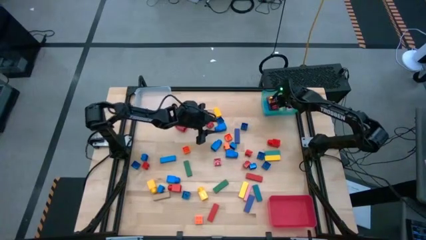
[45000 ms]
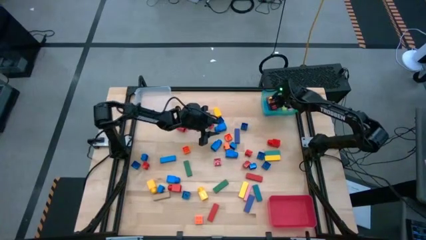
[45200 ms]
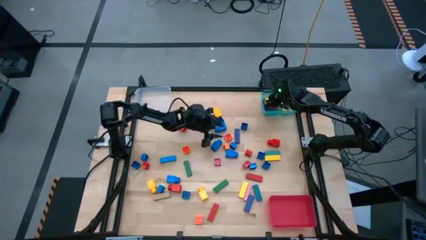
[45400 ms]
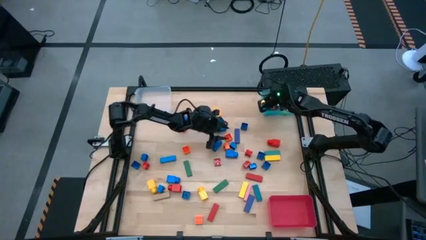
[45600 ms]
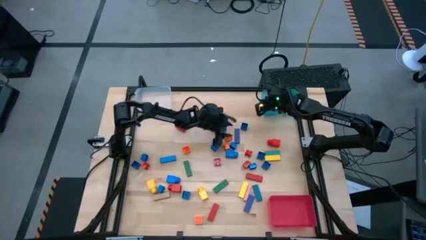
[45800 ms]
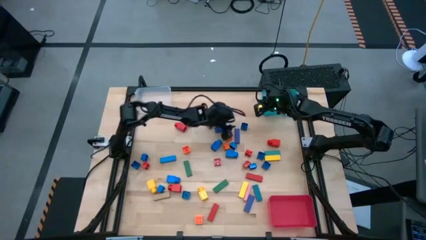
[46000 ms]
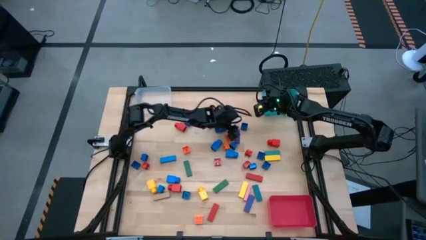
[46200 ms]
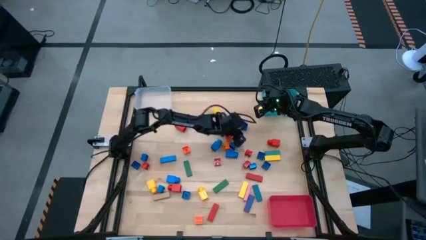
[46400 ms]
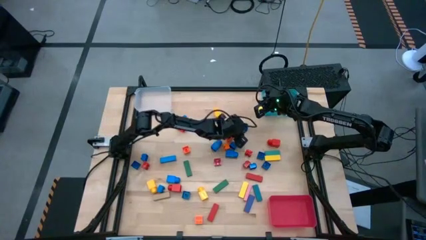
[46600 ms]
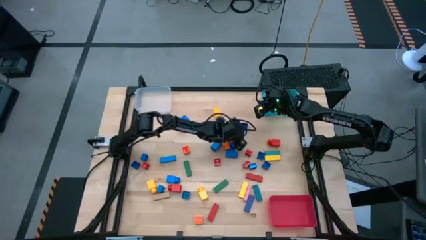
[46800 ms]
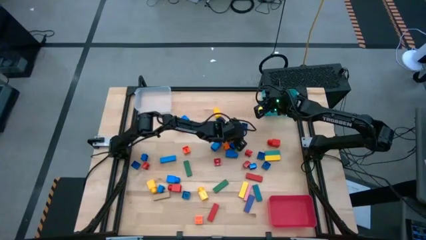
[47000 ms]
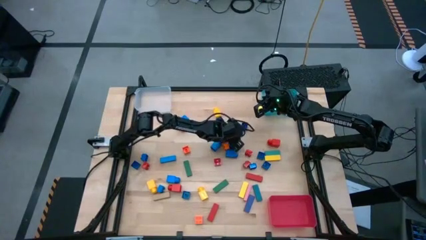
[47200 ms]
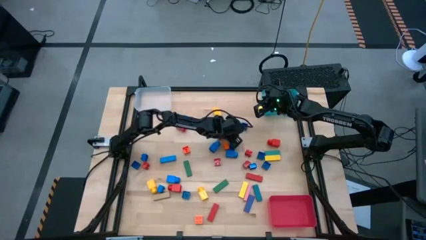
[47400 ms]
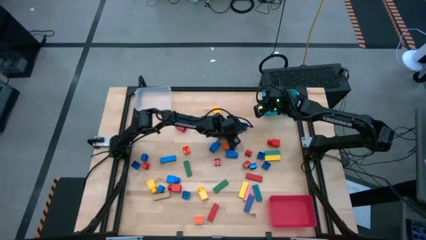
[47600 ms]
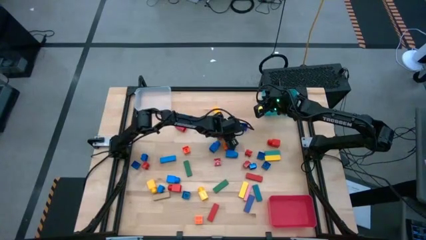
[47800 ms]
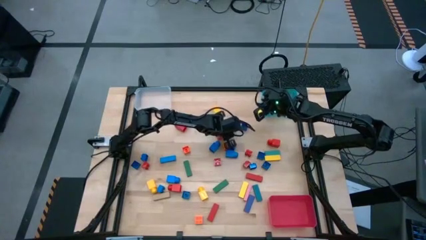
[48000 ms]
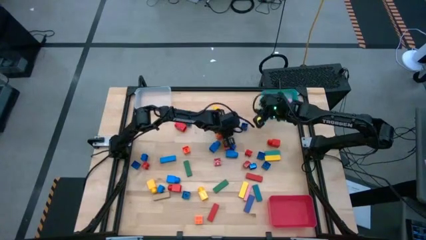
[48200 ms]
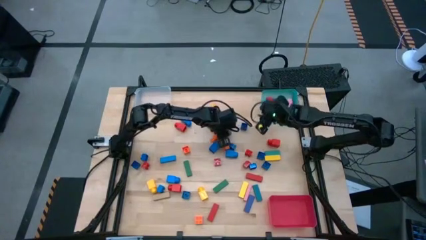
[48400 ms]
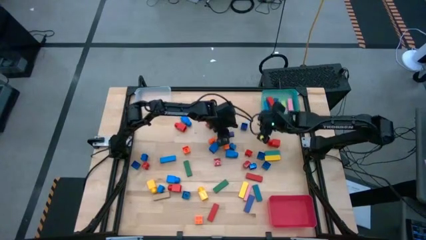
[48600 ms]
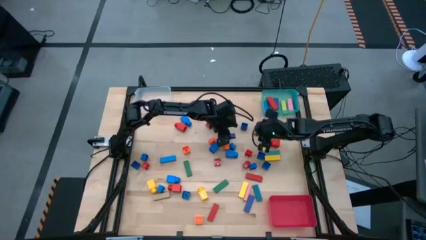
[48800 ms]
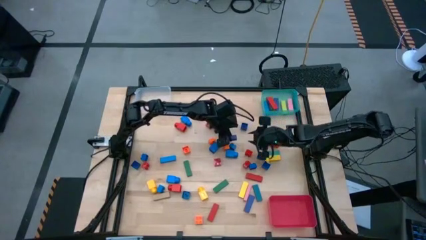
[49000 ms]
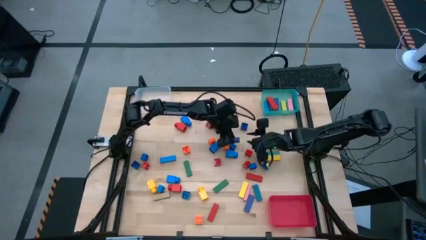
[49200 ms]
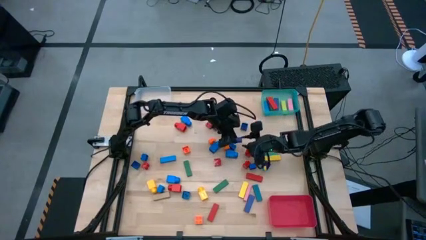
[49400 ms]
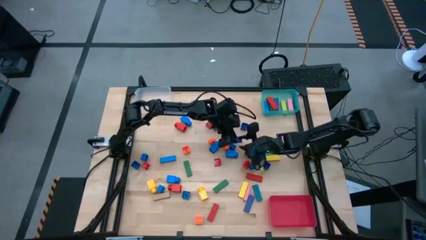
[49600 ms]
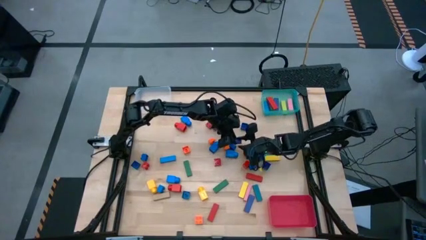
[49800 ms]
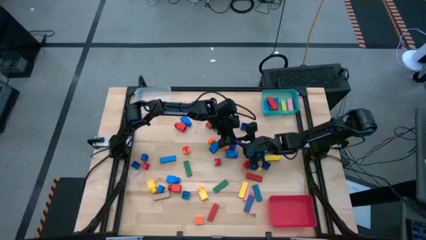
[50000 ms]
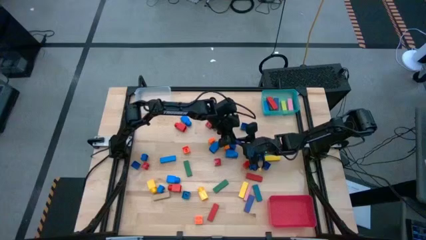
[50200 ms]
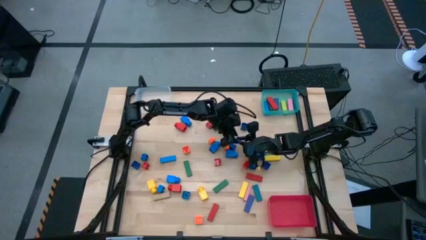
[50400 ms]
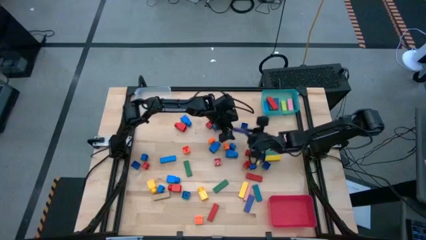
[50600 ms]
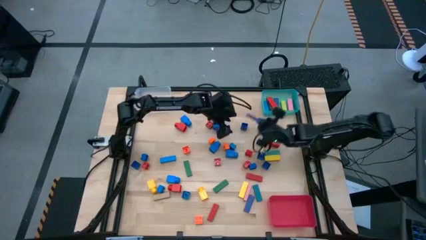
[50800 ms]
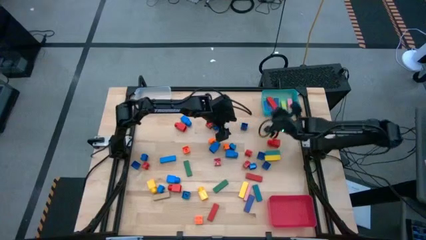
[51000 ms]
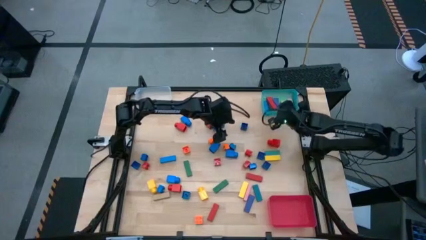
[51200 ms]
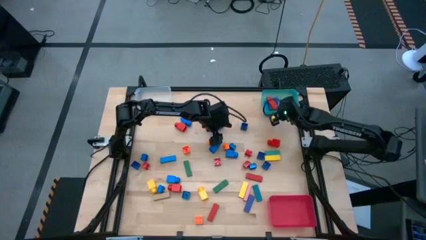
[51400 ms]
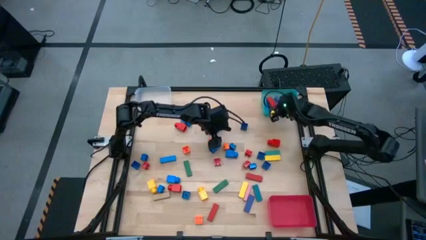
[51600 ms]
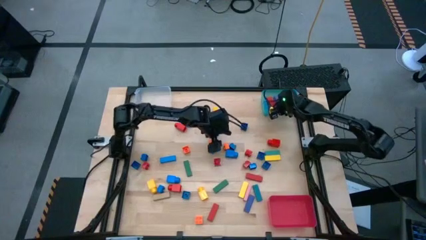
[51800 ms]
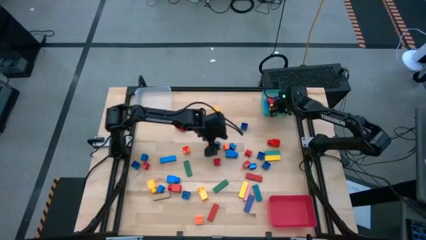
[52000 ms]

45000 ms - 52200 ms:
Task: Sort blocks by size
Put the blue block into the blue bin

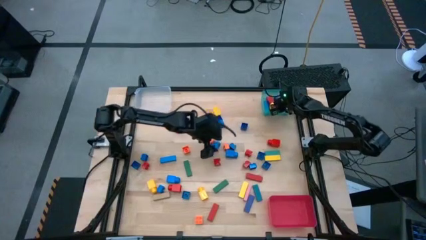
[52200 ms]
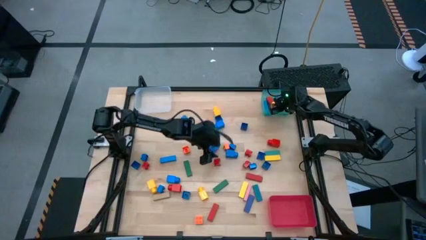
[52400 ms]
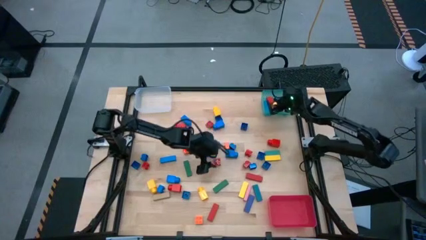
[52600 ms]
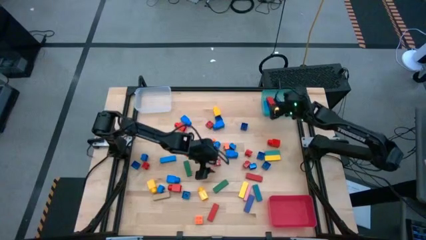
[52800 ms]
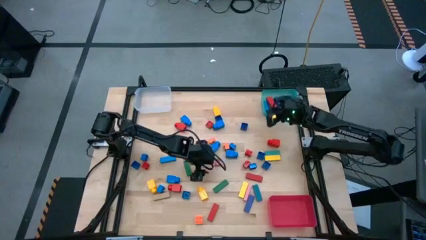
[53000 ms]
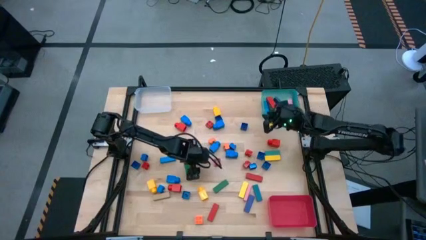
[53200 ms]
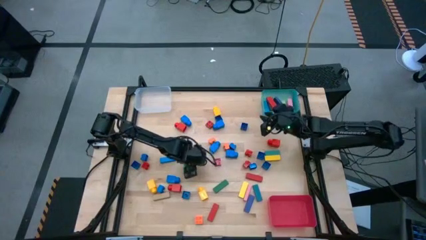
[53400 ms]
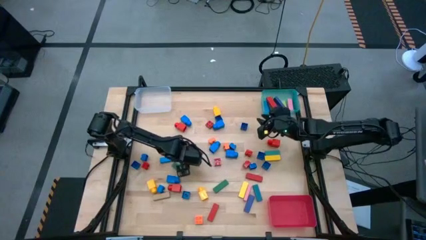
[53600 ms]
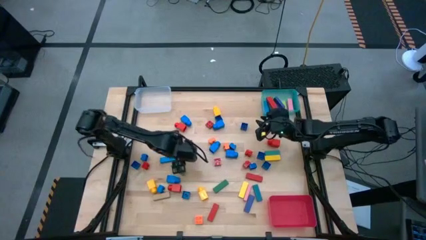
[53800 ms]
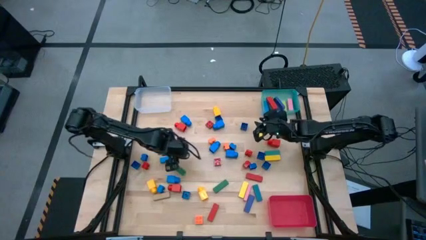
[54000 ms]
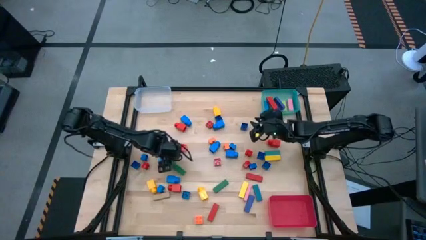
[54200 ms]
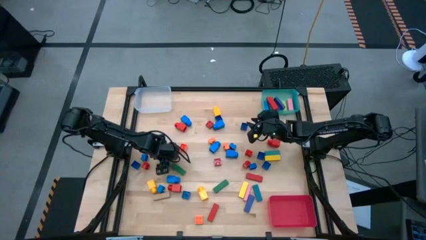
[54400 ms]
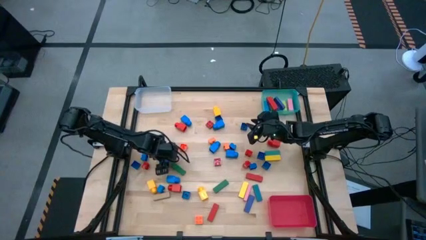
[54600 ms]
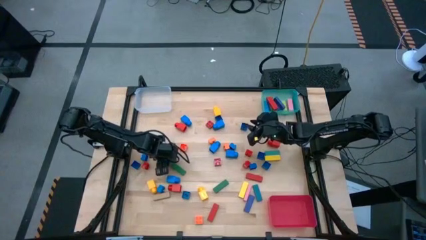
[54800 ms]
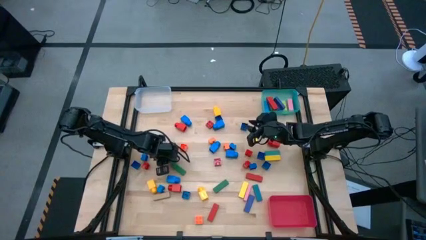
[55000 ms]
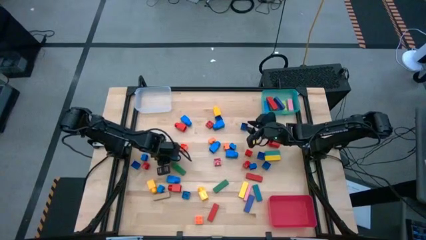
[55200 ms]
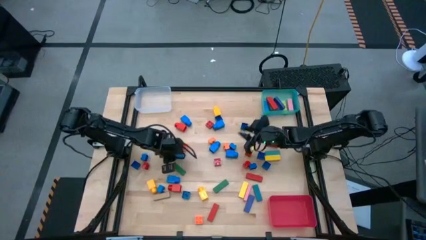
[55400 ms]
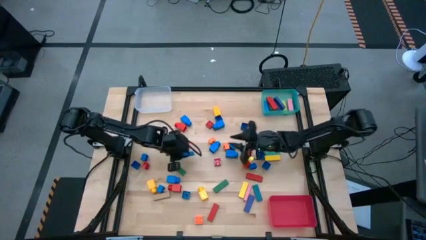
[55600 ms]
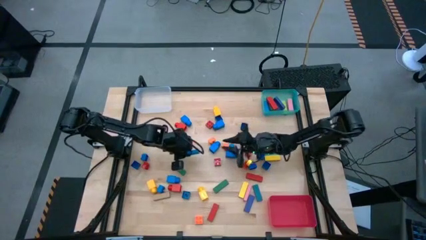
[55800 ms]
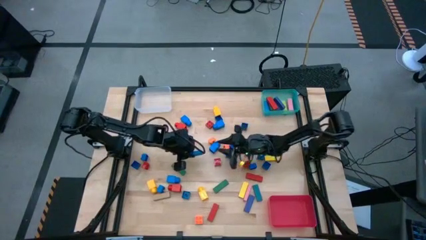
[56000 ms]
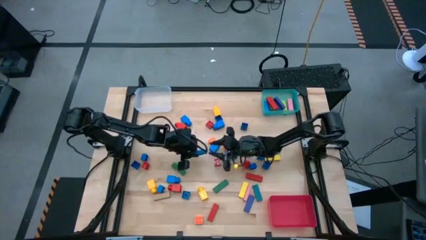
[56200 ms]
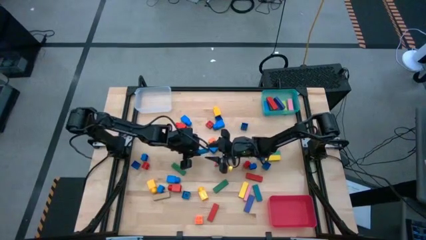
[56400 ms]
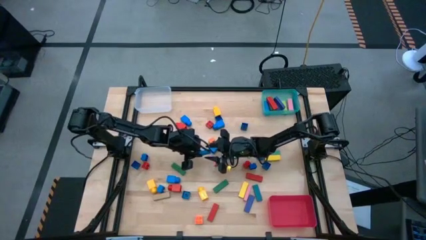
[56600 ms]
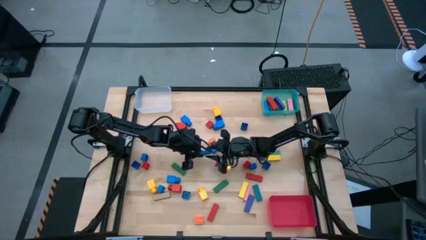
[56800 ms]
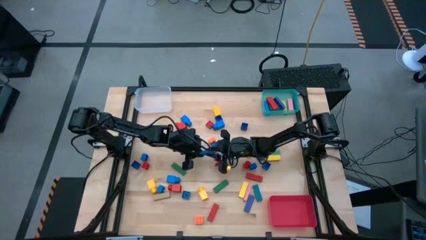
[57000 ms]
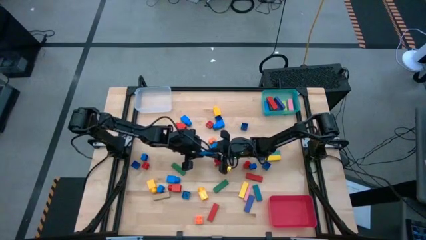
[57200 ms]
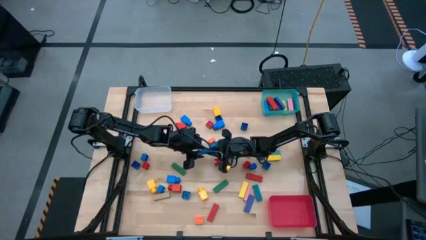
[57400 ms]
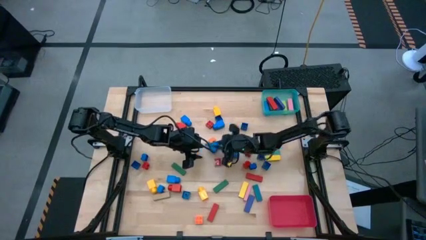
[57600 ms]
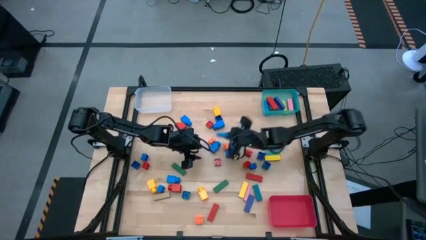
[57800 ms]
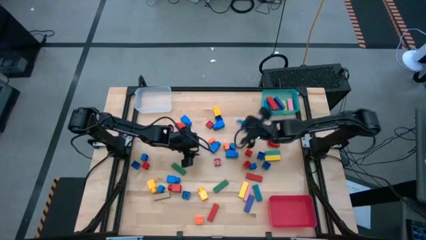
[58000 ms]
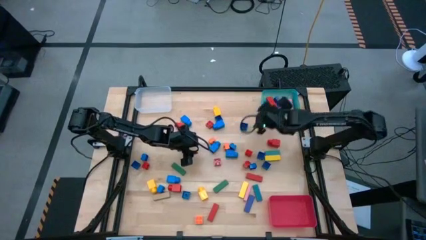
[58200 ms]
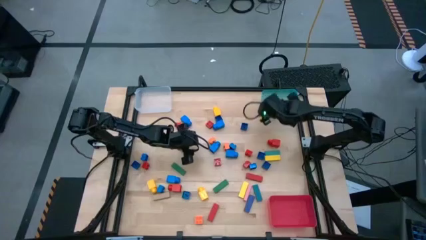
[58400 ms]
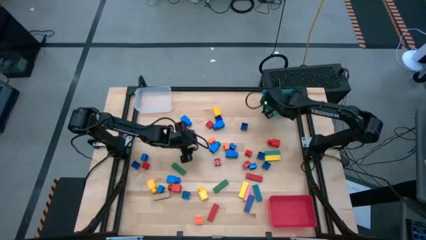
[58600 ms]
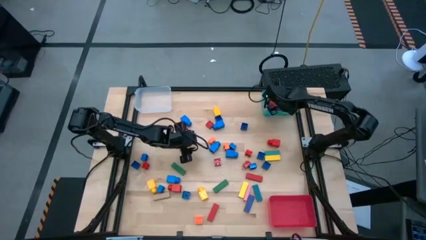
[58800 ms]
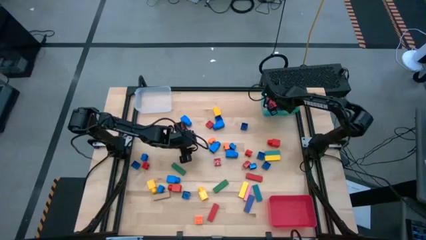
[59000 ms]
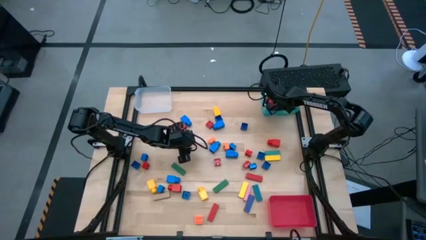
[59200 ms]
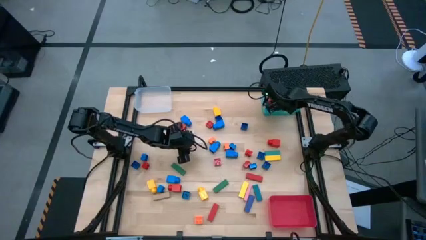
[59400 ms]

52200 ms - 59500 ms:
Put the blue block into the blue bin

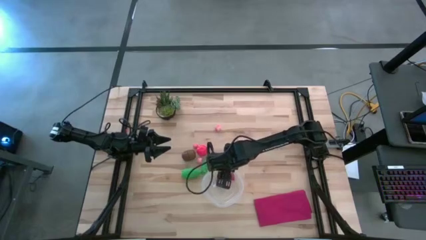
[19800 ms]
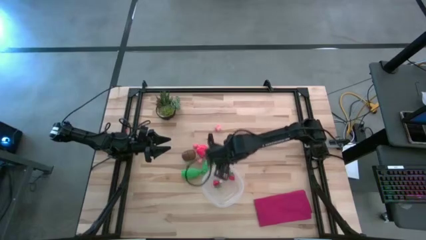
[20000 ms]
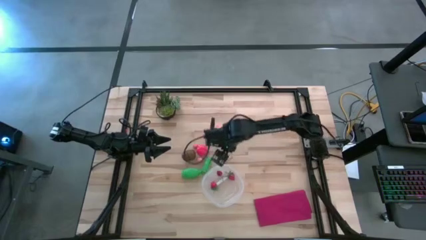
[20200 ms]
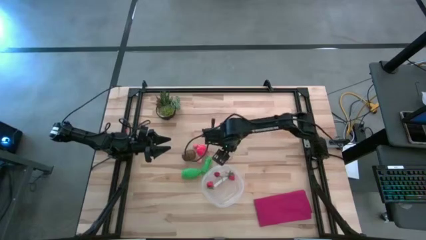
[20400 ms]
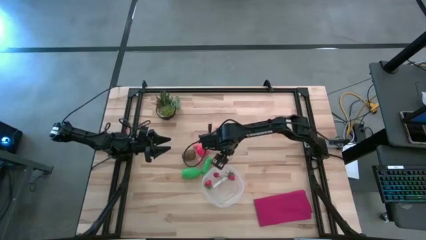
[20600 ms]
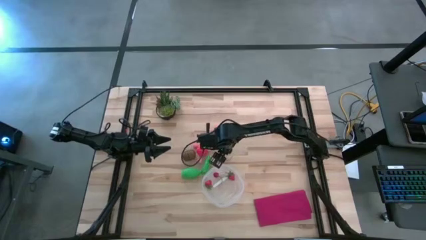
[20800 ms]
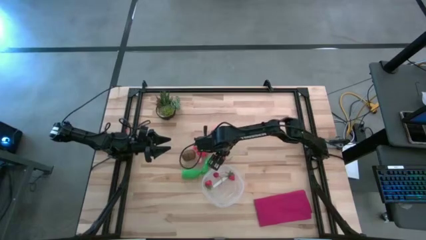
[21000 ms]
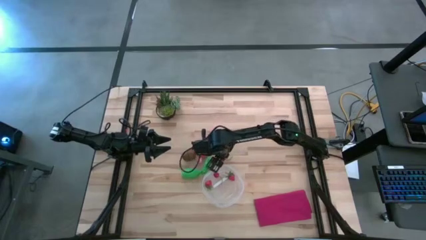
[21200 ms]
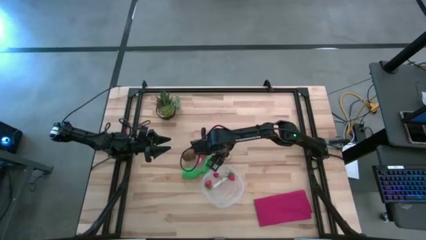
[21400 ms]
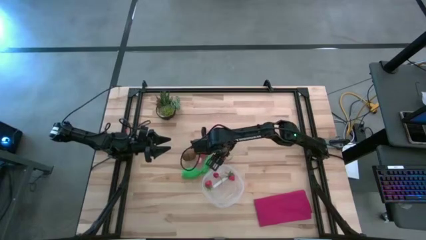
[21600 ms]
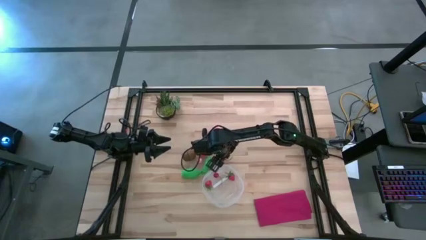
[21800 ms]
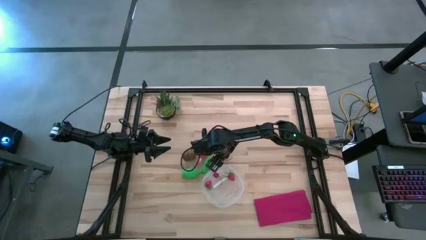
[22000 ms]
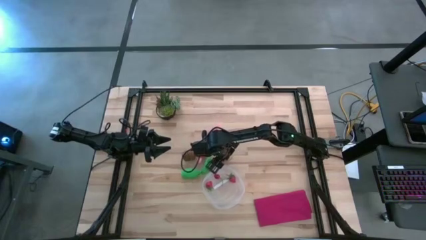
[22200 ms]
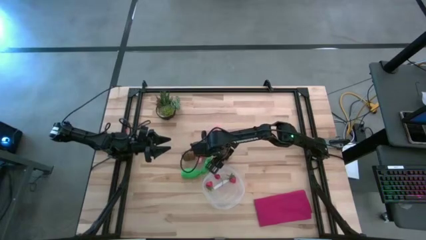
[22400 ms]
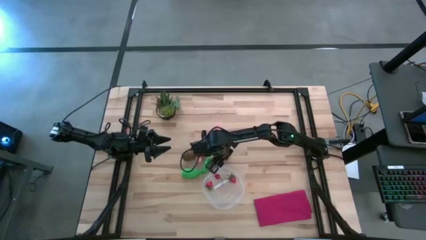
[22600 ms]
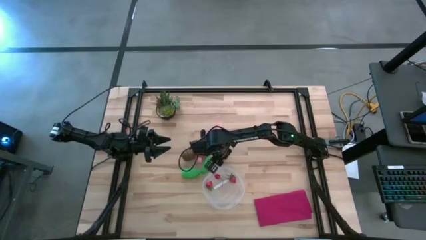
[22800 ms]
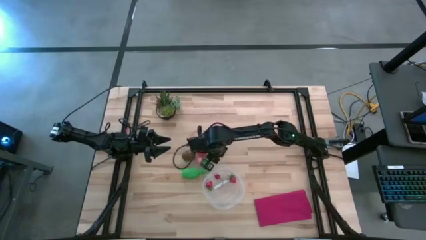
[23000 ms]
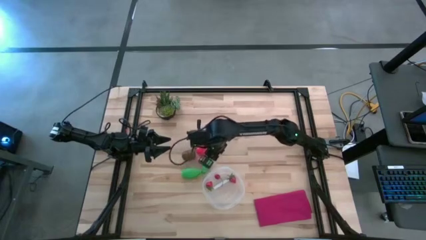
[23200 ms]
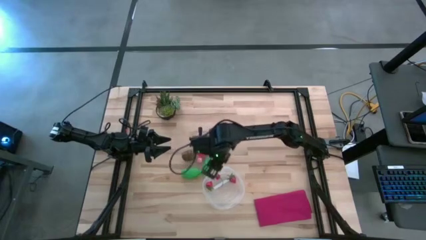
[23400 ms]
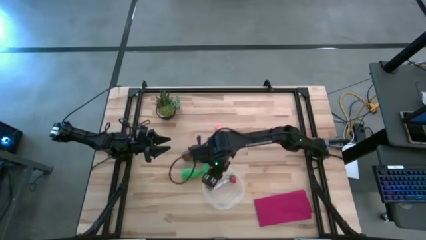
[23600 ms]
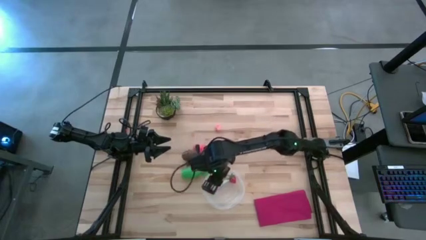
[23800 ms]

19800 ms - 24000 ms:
Task: Pick and placing Produce into tupperware
Put the red cherry into the transparent bin
